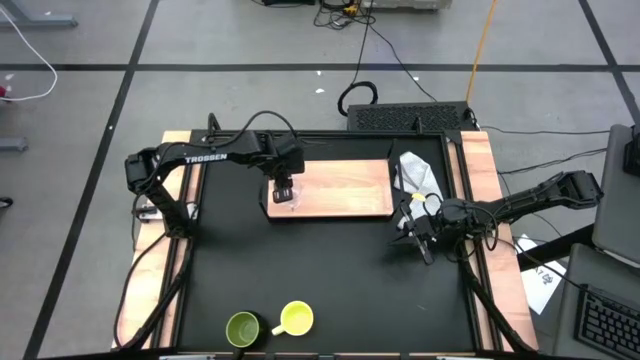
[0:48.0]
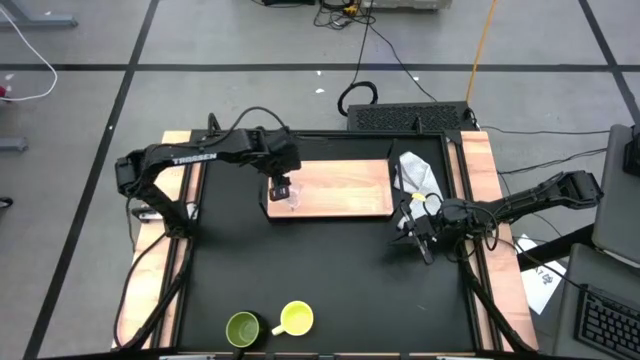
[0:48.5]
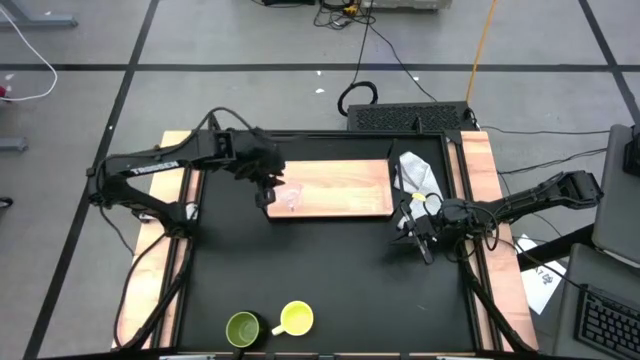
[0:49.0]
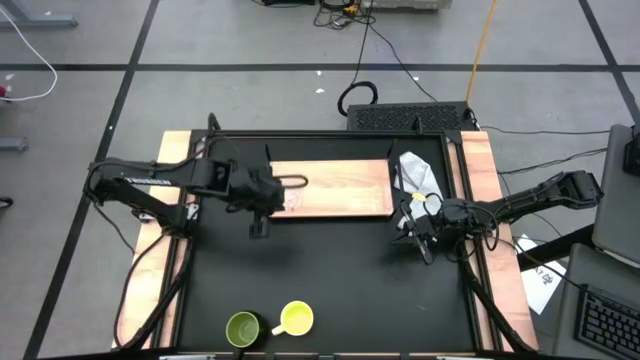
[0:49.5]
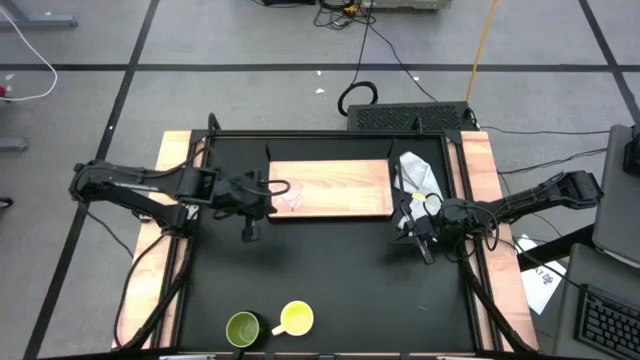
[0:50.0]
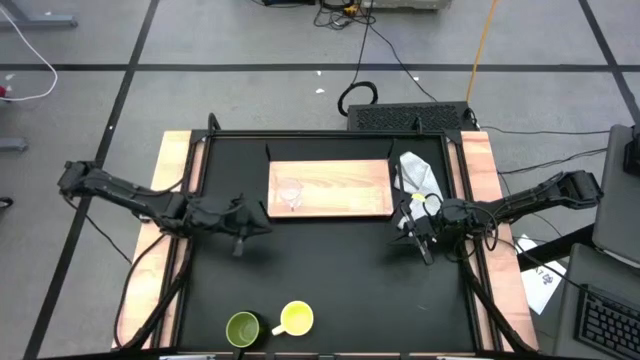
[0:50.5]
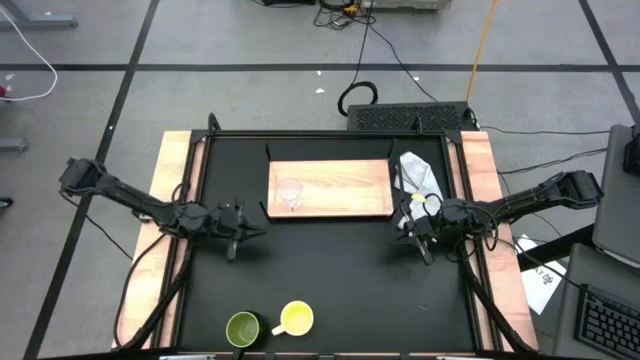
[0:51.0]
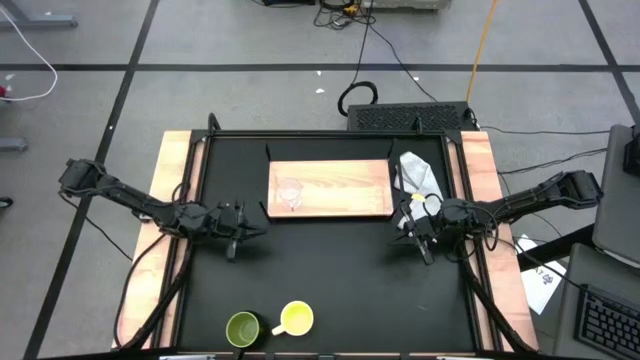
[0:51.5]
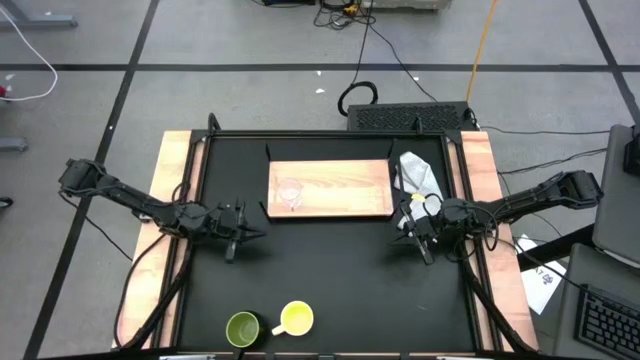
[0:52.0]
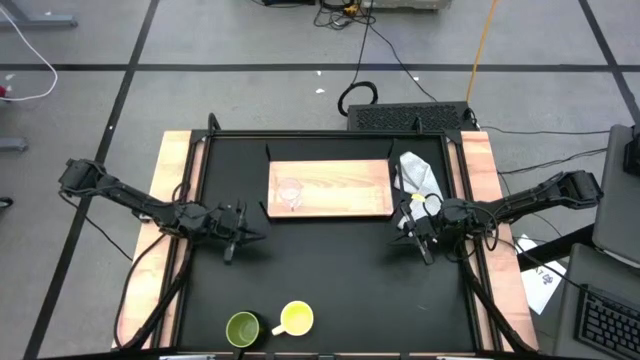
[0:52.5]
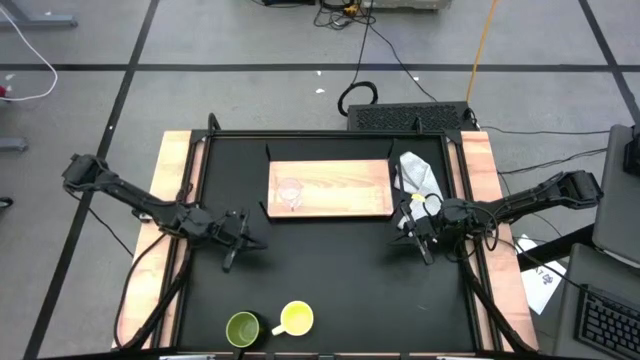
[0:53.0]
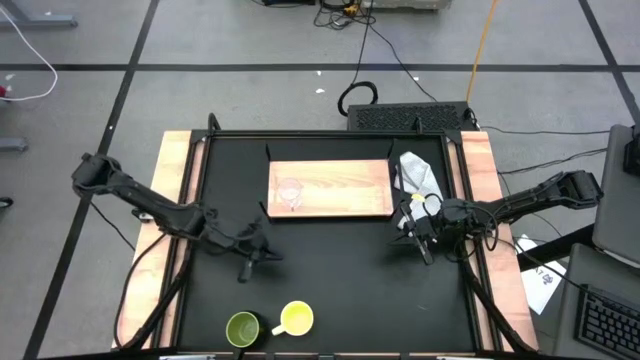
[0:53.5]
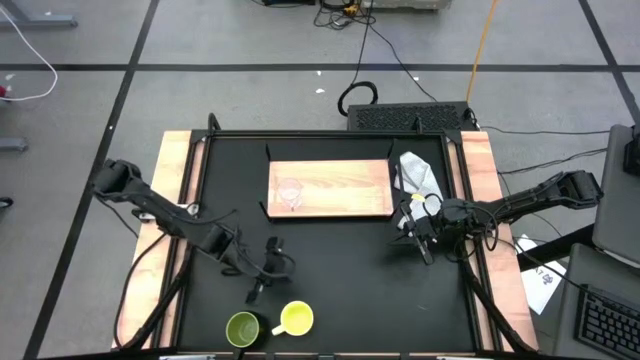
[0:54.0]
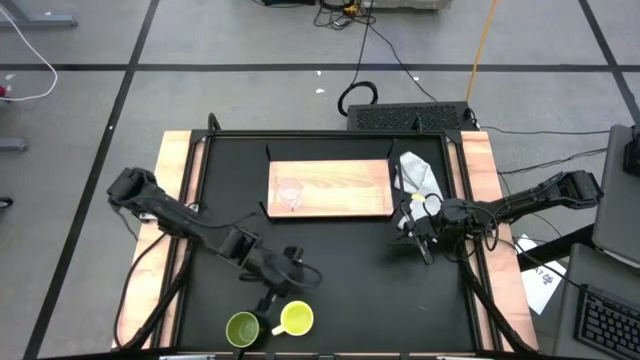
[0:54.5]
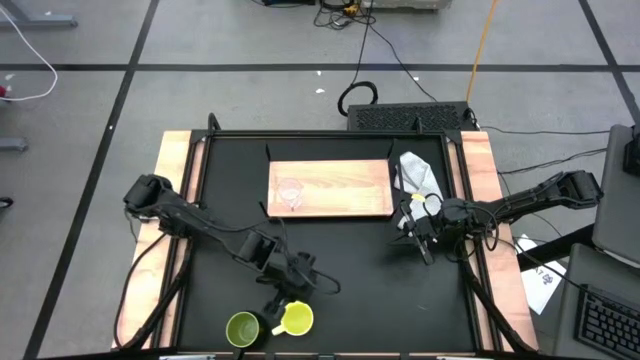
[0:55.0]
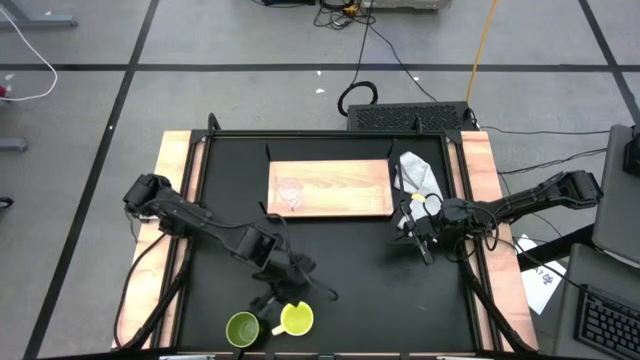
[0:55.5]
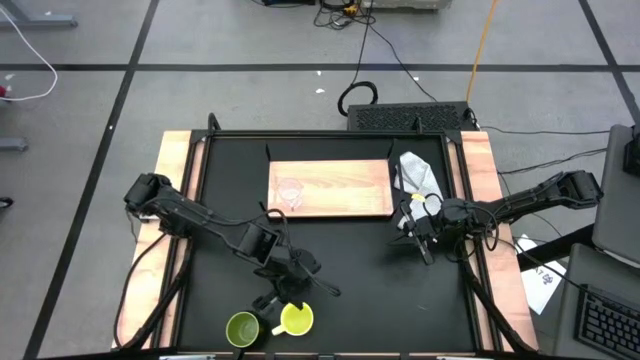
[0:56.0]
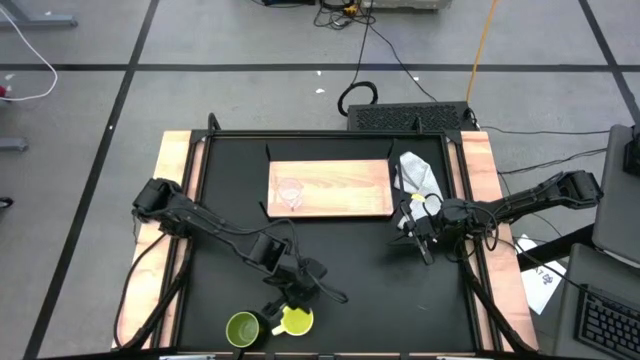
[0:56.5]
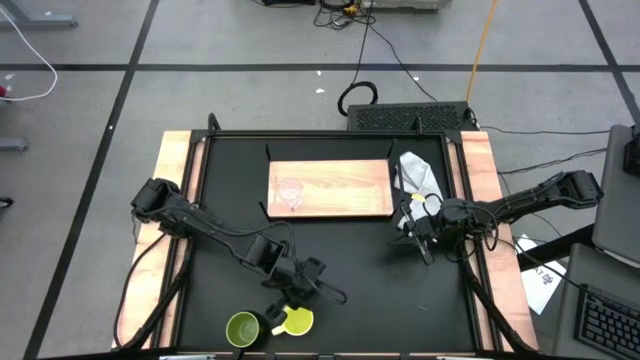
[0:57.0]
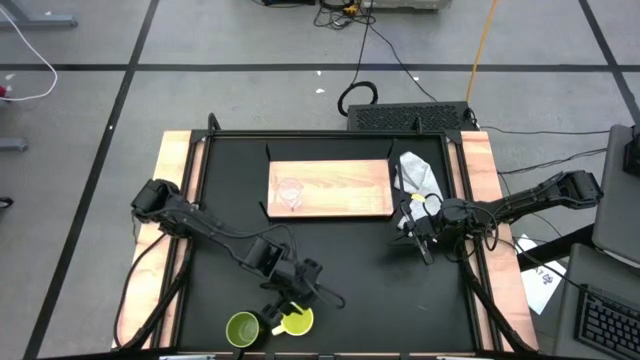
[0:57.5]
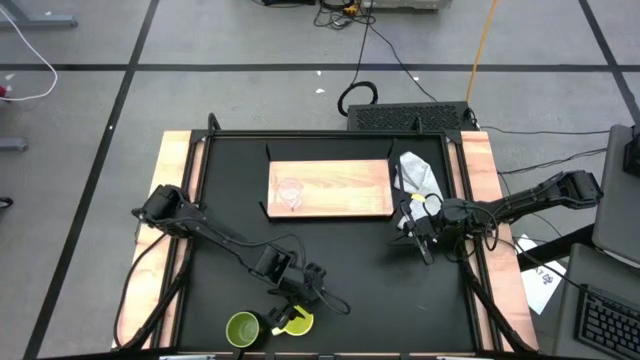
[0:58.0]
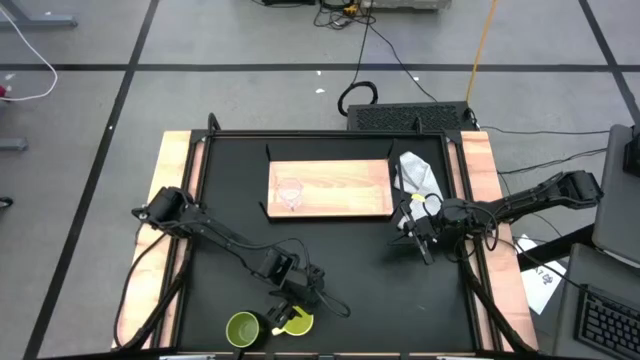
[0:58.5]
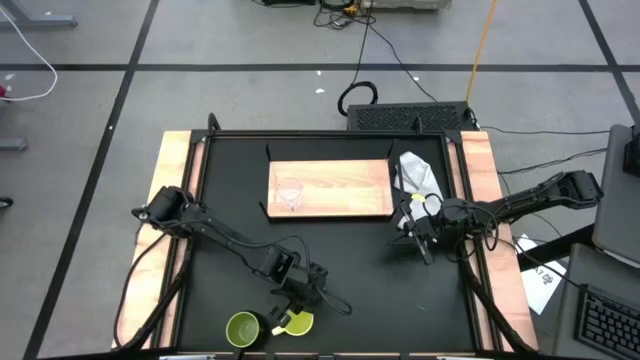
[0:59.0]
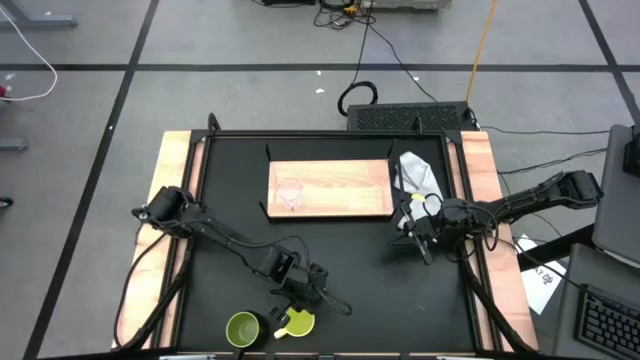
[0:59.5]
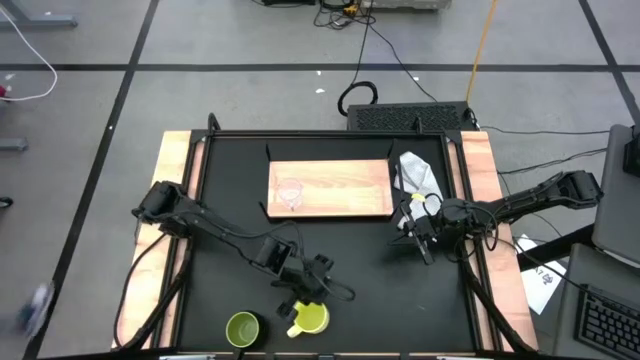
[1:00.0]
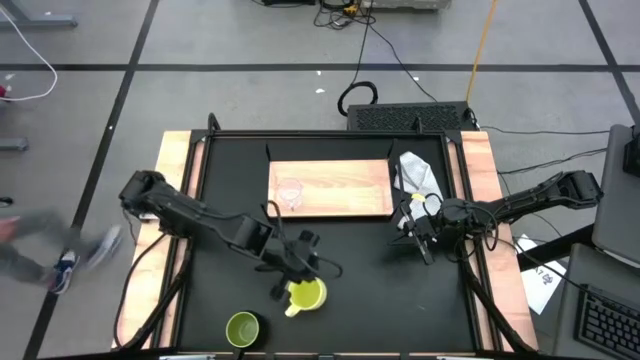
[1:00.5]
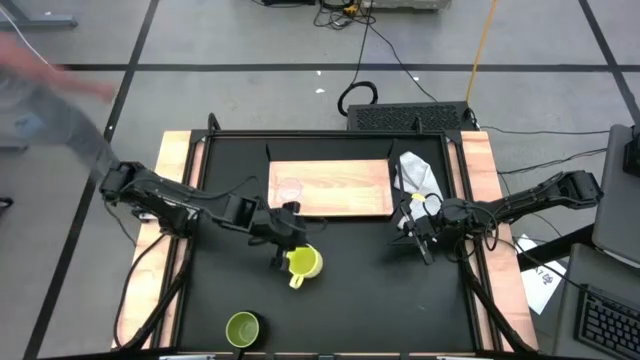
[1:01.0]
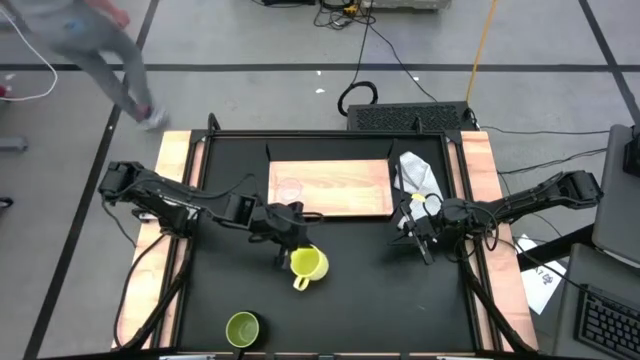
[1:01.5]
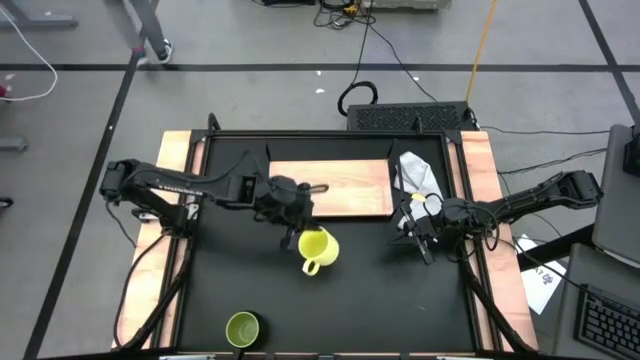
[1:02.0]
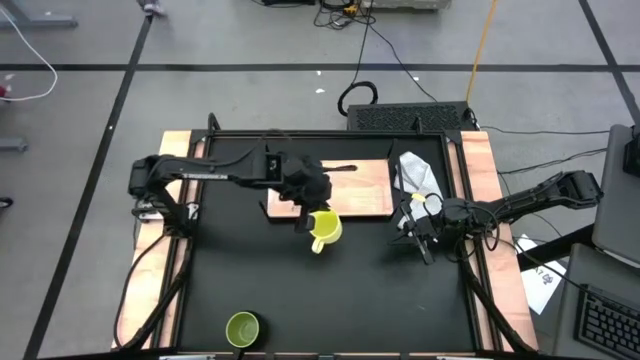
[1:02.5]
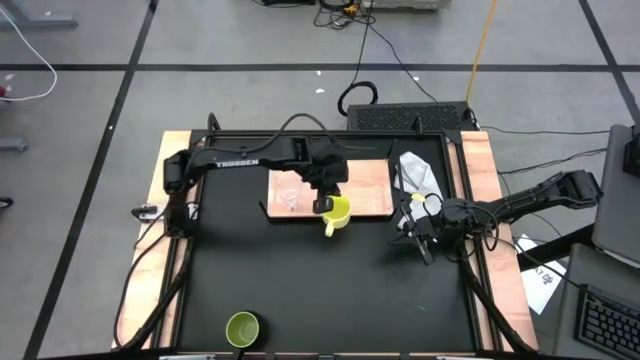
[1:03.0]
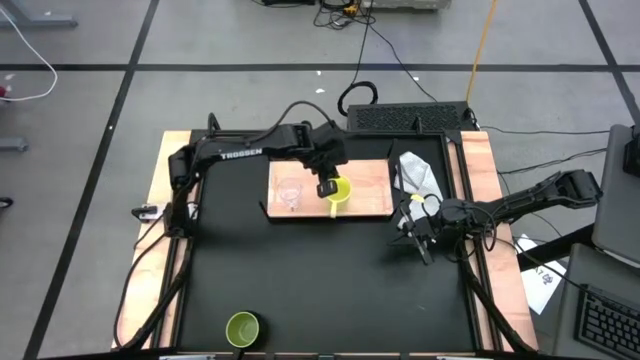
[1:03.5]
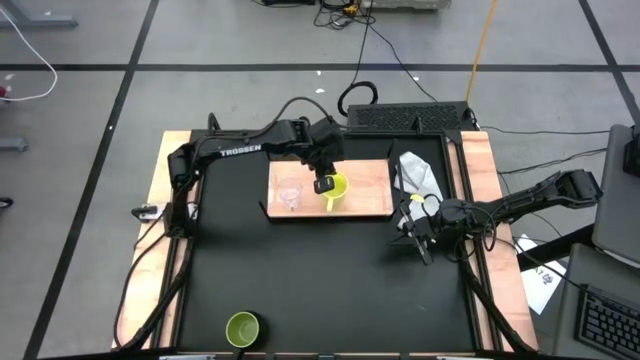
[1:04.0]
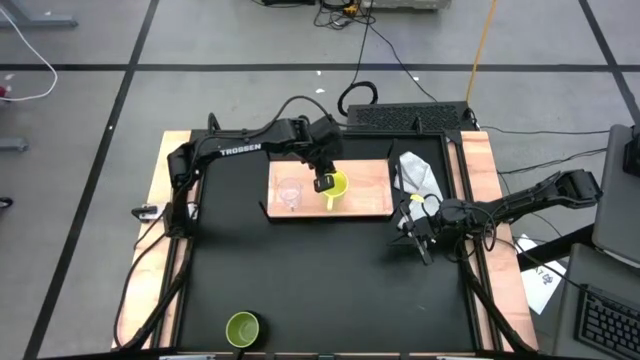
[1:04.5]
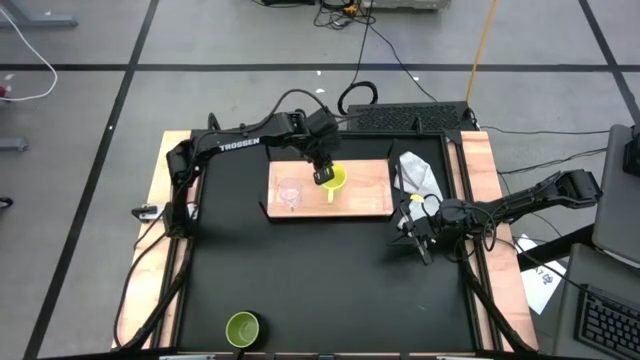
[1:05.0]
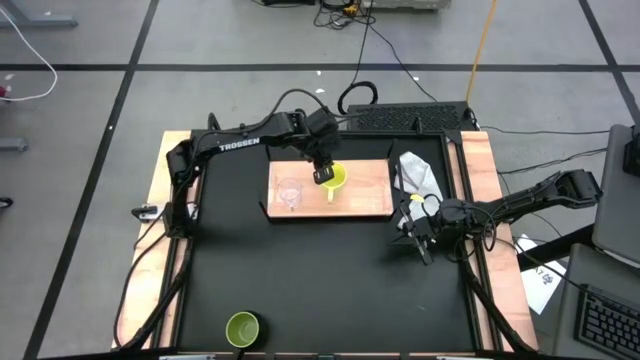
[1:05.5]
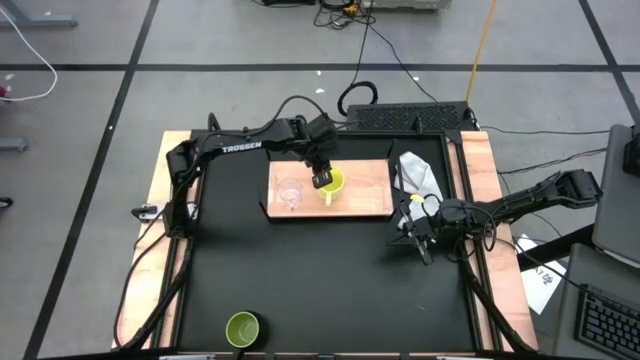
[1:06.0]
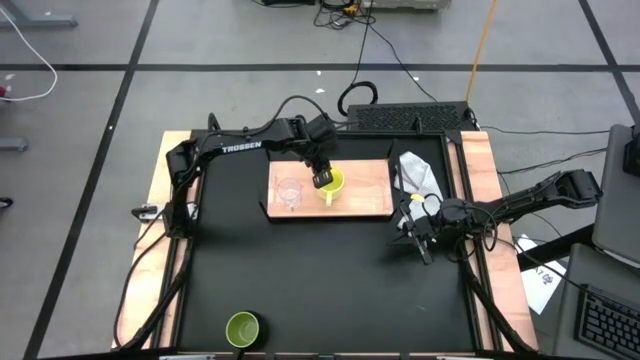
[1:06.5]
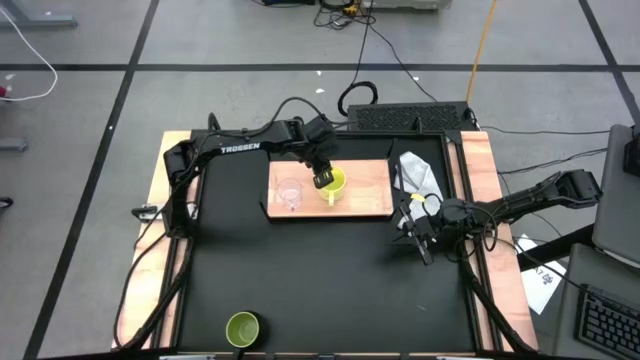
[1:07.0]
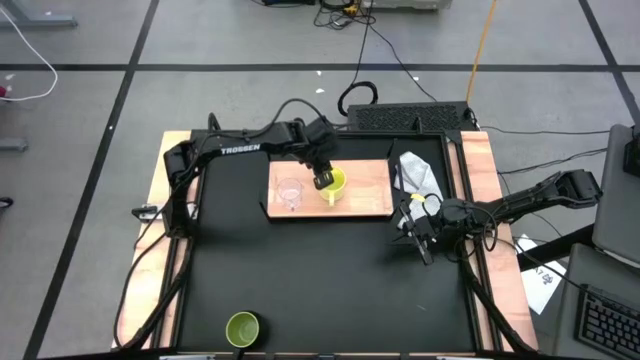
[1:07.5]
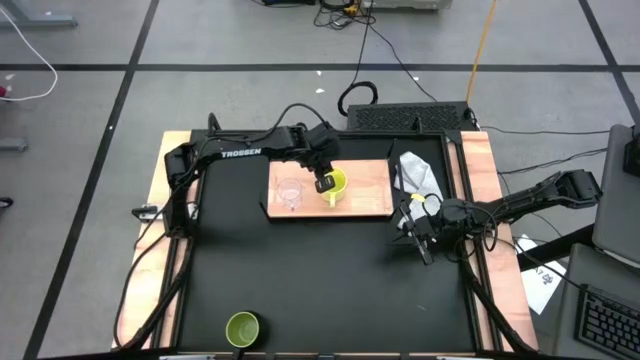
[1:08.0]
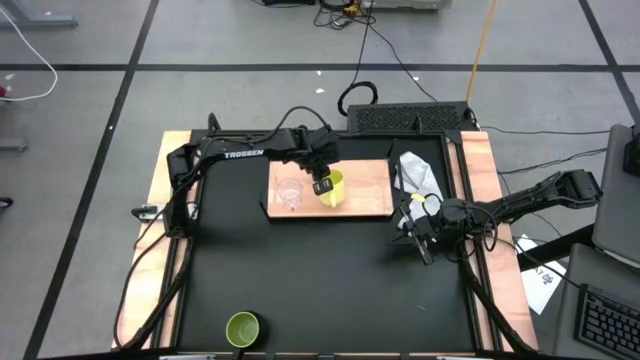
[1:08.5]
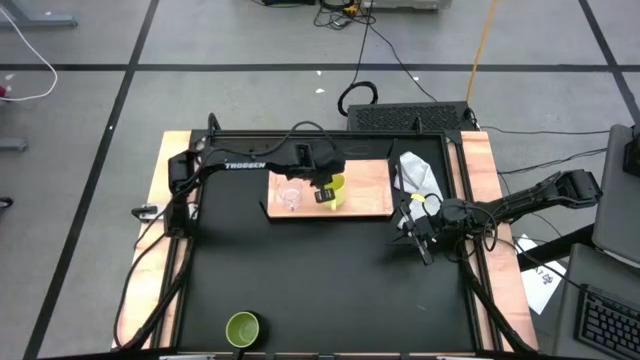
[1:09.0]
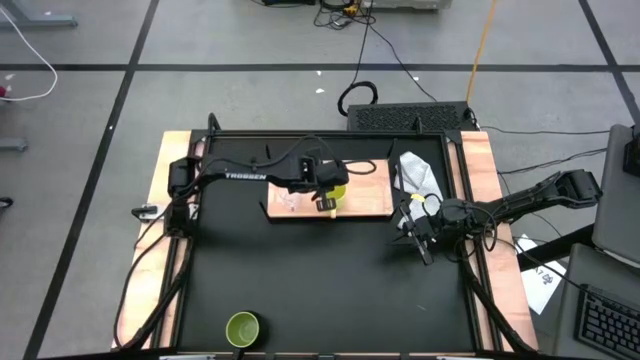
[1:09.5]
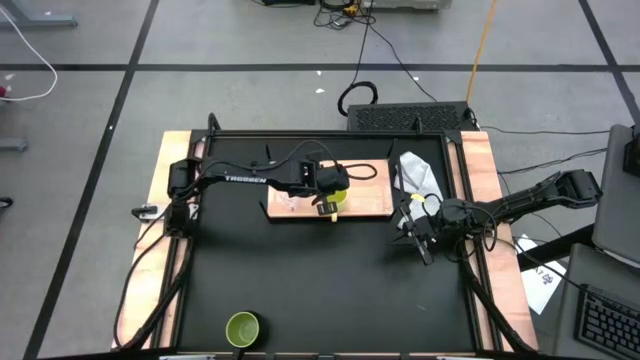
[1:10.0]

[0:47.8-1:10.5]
Task: Stack small to large cups/mugs on shelf
Put the yellow mug on the shelf
